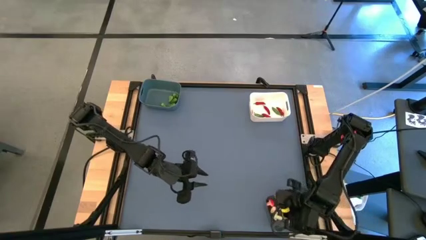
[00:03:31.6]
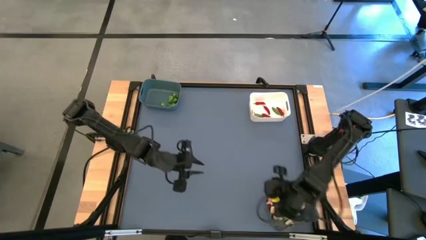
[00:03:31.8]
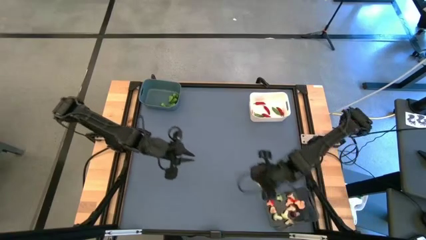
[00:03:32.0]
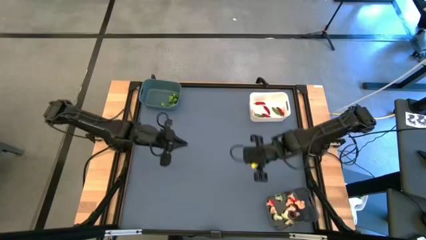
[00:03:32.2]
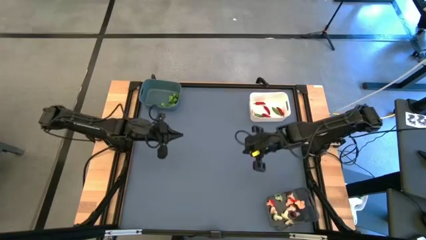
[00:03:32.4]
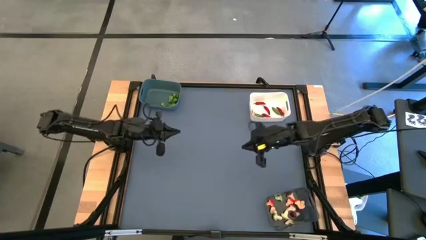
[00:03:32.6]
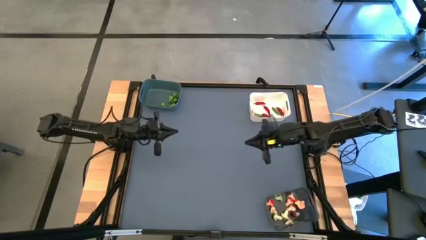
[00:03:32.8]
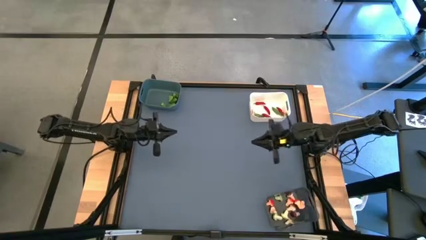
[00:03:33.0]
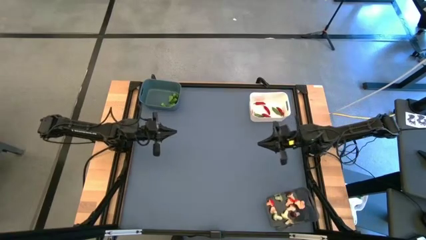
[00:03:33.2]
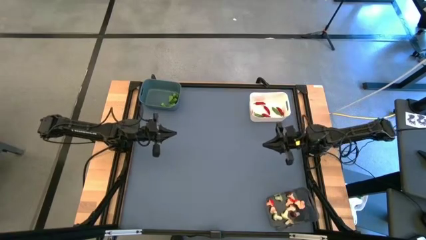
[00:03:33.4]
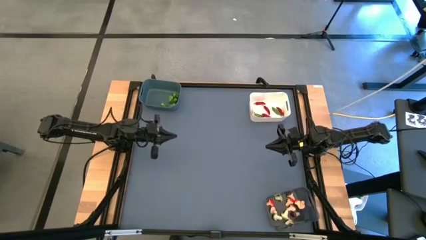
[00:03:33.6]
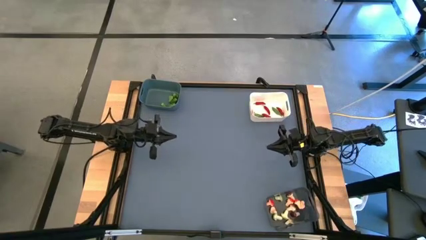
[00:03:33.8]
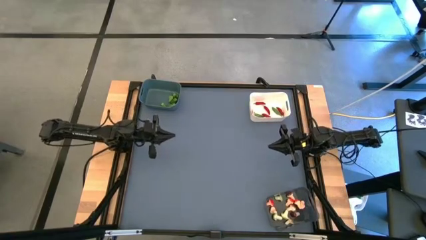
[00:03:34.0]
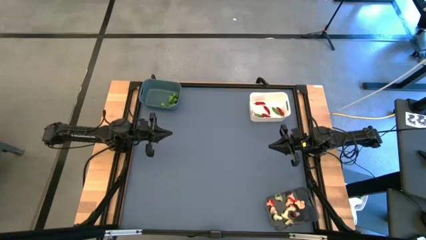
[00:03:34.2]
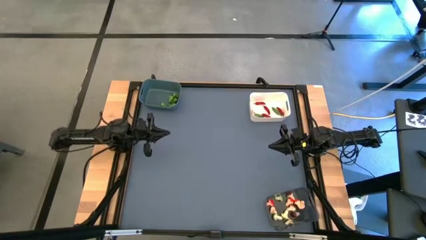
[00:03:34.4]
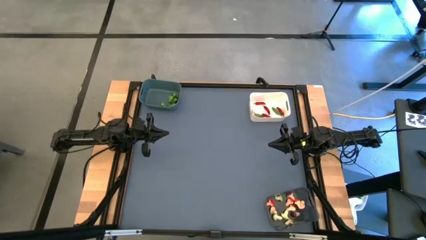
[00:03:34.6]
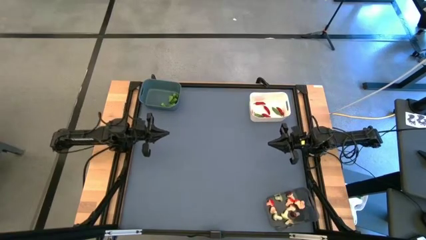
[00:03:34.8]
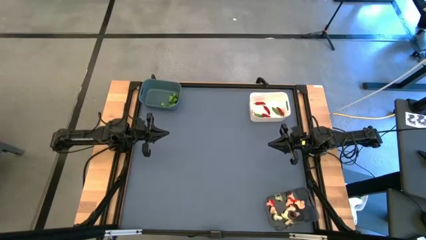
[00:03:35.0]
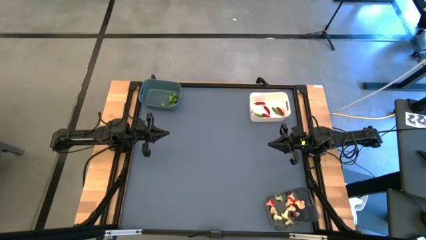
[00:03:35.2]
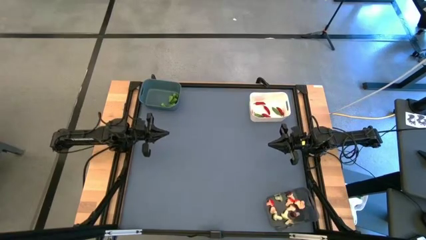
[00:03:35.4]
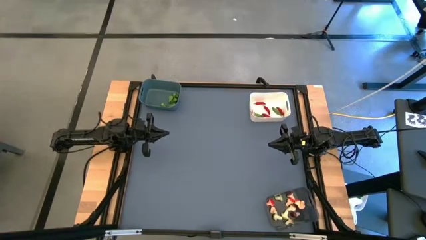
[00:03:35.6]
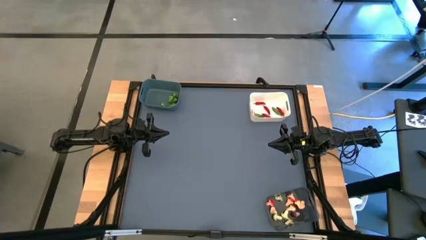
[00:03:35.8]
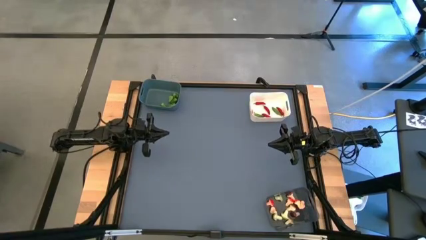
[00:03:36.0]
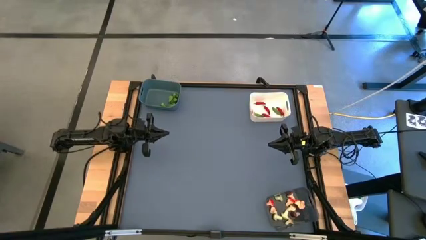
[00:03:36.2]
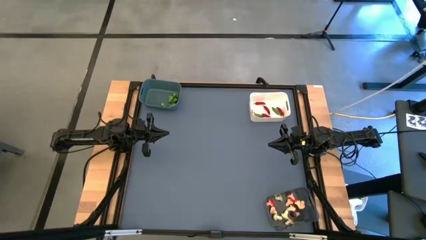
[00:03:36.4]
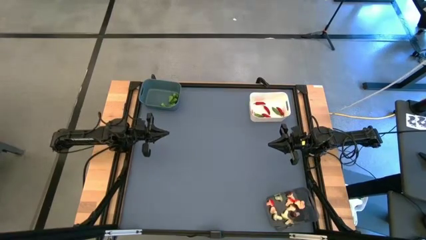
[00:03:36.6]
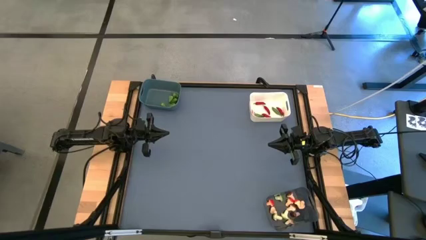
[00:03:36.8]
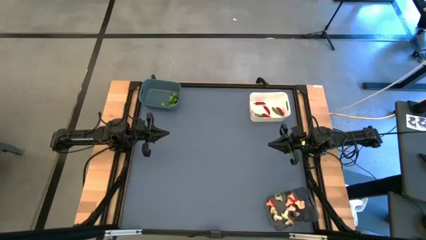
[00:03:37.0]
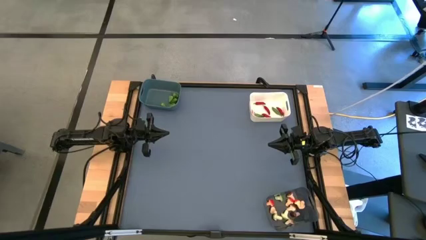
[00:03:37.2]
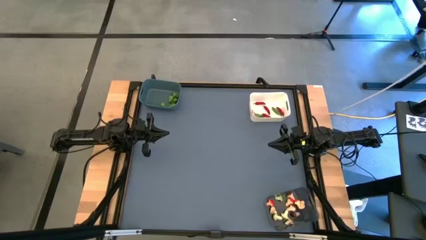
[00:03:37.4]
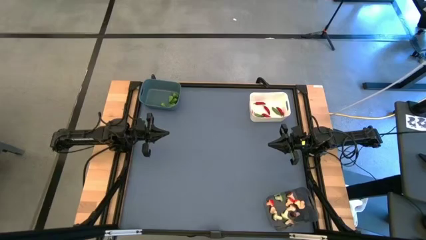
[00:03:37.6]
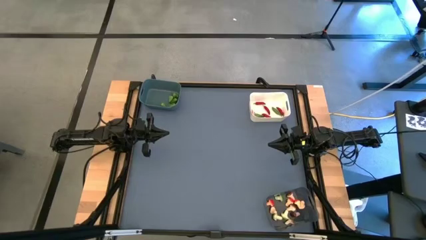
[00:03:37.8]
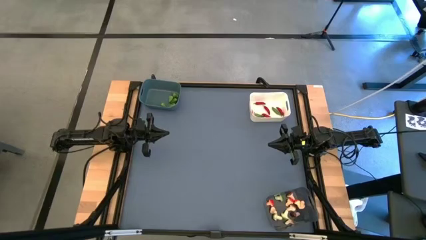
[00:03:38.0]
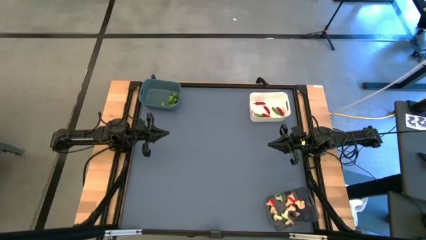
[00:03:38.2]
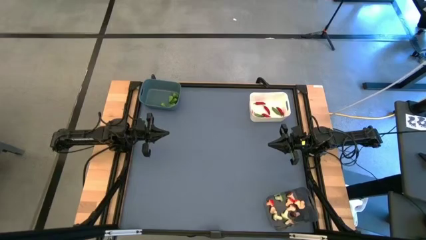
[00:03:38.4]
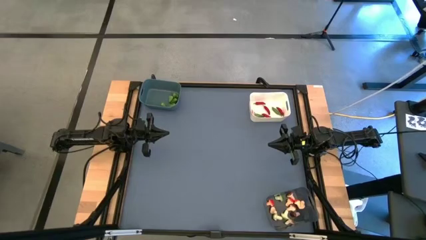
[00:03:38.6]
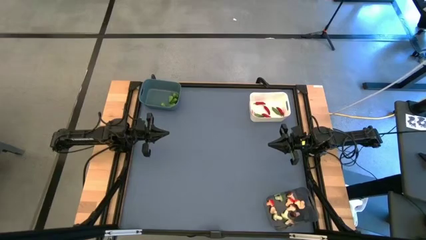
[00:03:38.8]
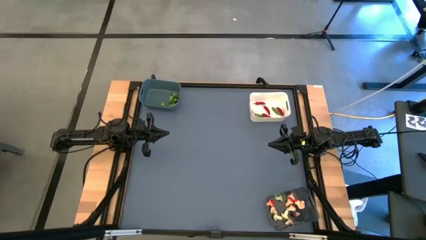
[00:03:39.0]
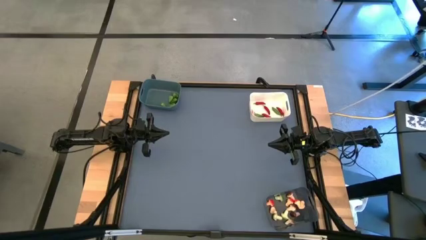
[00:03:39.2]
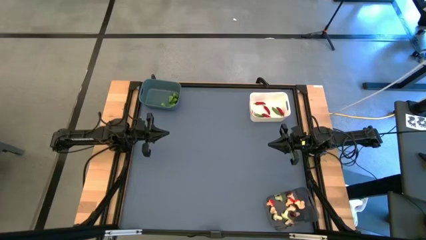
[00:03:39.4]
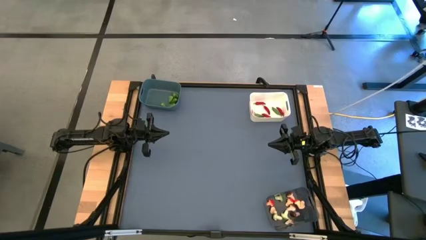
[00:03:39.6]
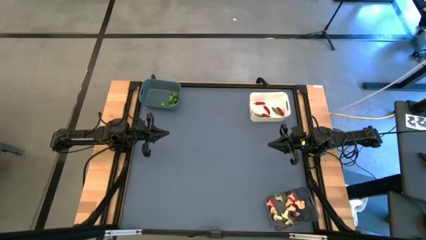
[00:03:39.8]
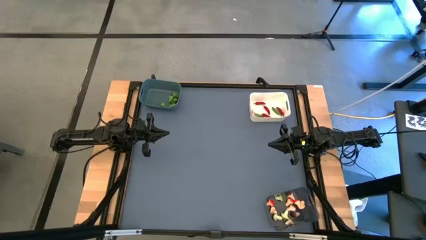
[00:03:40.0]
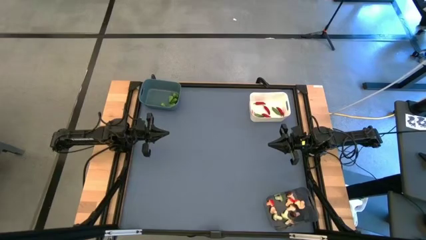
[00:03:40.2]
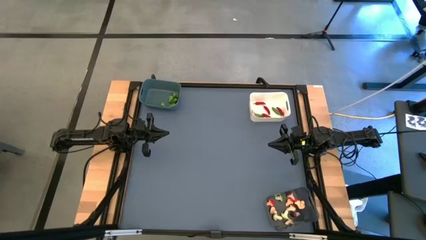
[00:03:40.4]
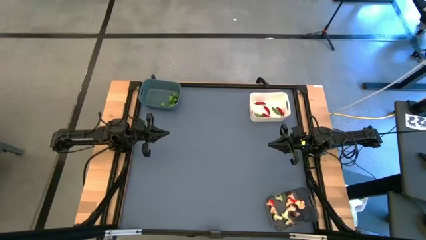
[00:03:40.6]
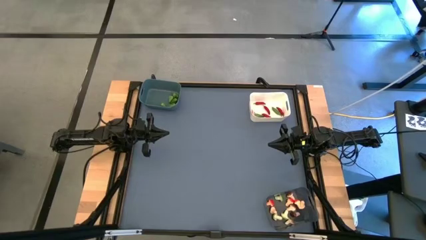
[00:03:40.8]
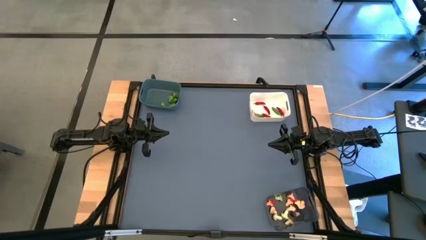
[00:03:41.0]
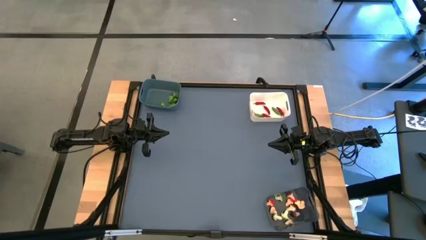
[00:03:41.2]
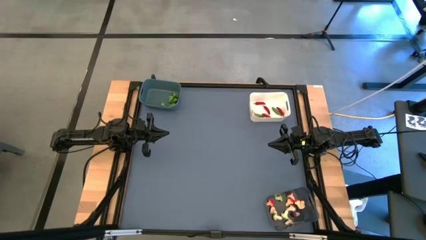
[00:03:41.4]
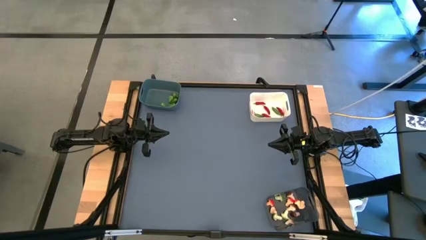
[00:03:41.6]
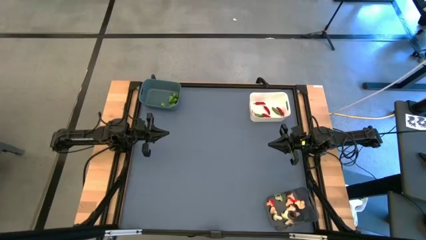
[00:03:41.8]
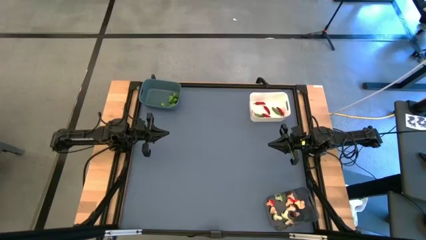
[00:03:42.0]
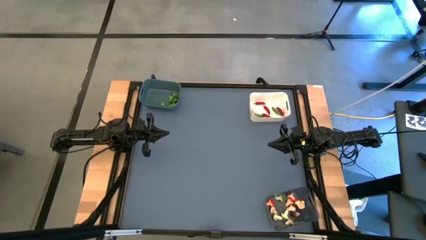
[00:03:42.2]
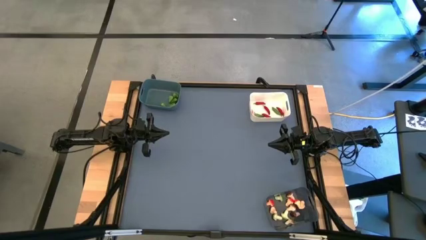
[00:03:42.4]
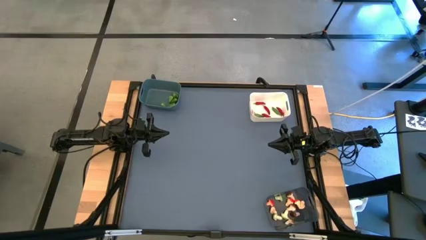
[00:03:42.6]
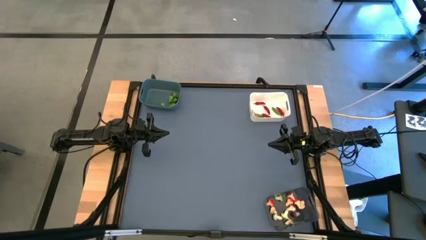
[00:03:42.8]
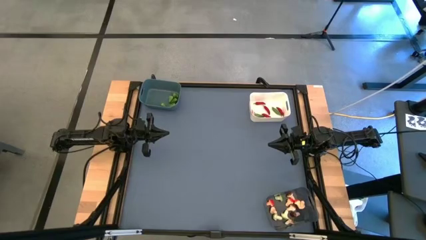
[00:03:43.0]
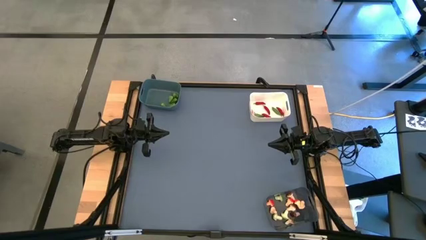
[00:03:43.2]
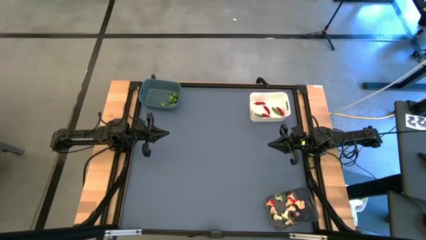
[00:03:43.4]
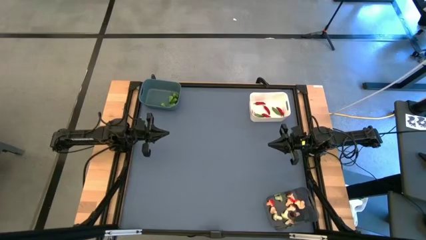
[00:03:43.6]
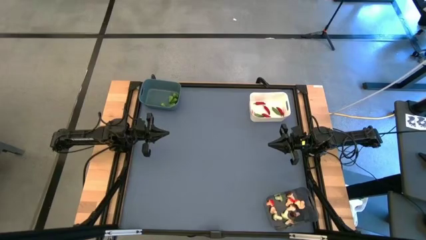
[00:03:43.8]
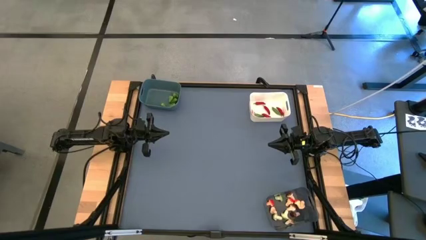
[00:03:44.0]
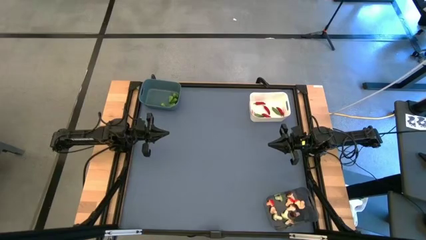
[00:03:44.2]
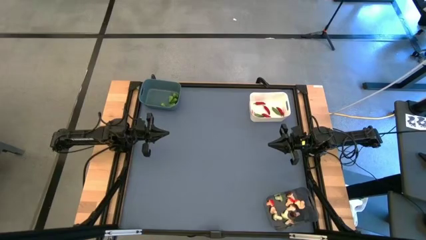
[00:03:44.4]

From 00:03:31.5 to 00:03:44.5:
Task: Sort produce into baskets
Return to home position

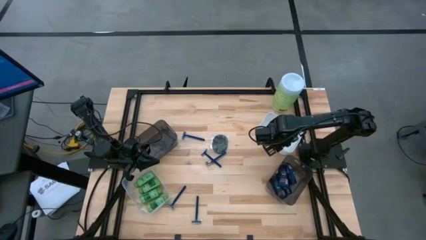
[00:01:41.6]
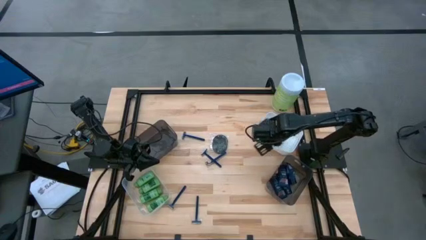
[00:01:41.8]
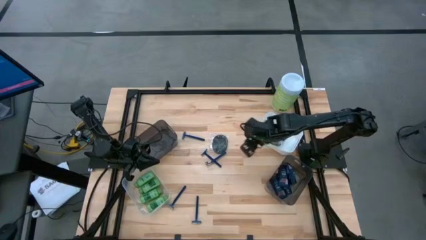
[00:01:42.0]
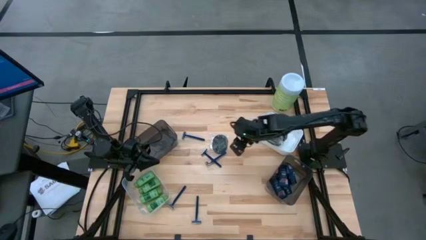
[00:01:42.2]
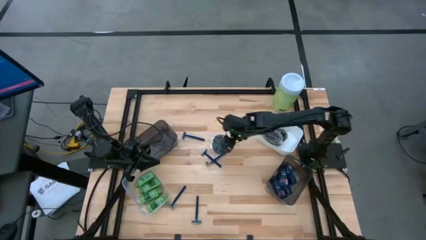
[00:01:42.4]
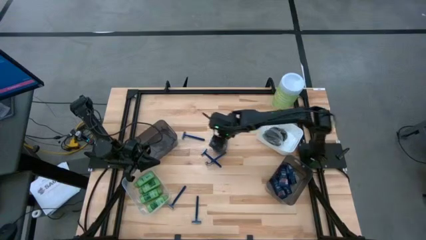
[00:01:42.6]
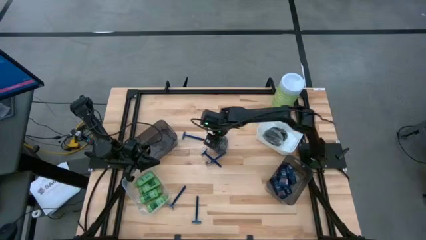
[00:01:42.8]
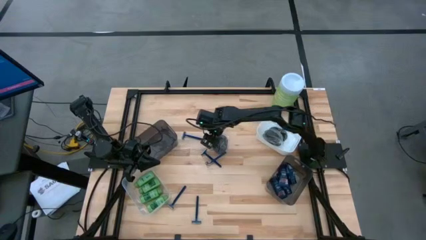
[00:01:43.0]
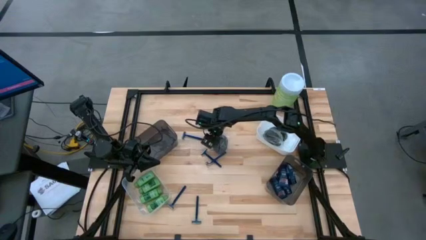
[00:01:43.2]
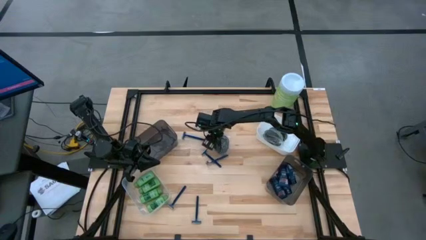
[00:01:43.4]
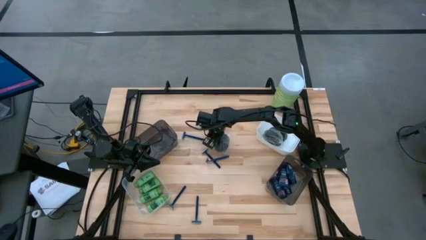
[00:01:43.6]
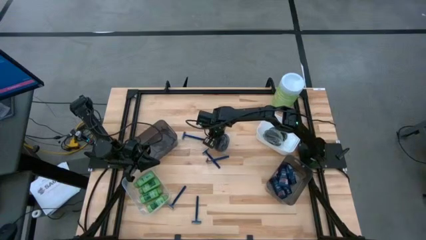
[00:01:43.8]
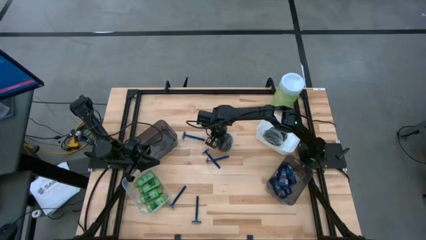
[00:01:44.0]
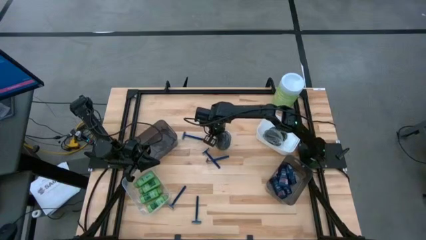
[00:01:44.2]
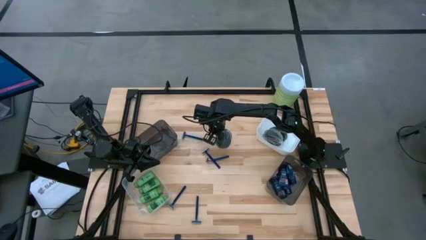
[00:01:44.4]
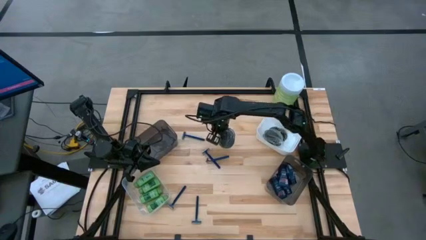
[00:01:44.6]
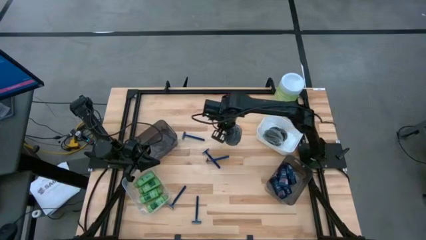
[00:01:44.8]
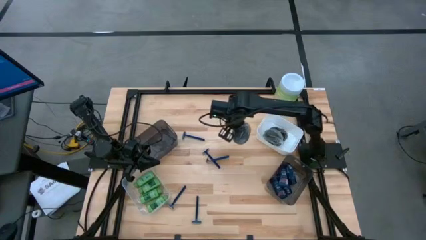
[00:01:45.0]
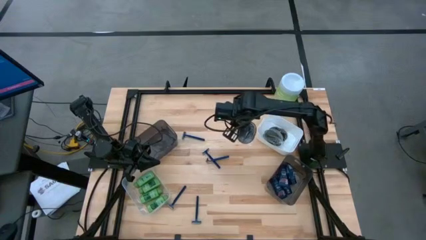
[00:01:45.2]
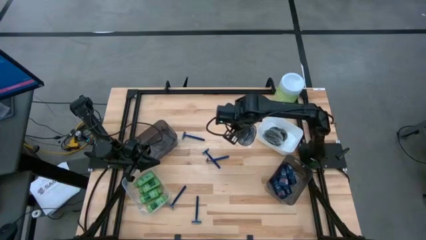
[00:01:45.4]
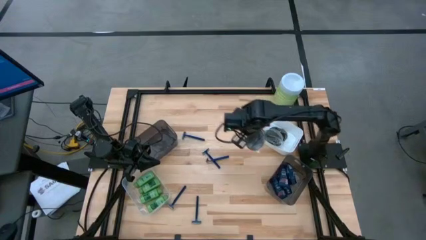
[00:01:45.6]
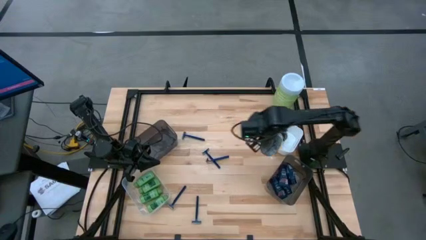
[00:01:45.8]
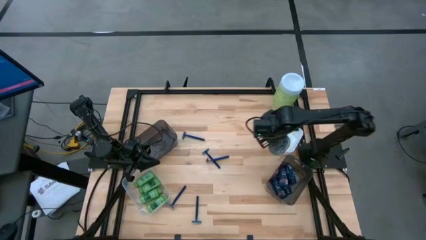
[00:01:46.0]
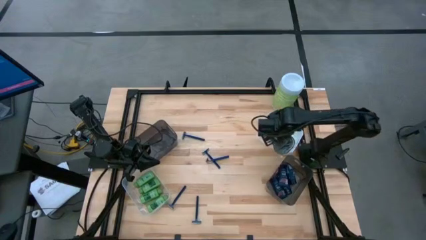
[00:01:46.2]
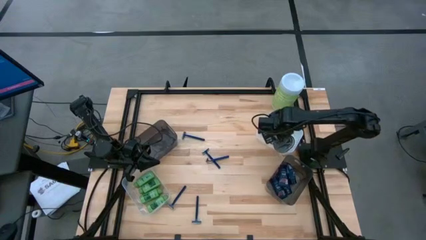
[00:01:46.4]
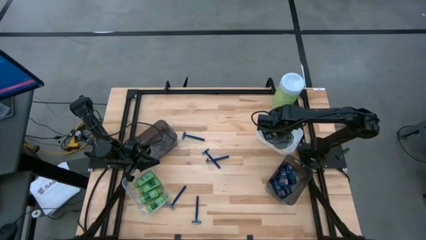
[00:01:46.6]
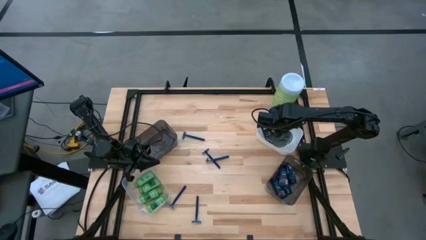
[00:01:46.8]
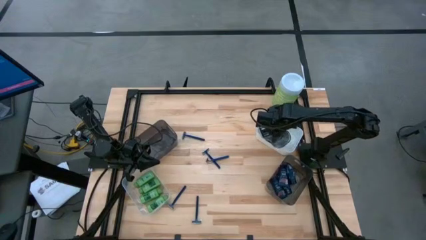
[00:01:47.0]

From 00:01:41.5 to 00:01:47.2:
Task: Pick & Place Travel size toiletries
Put the black hairbrush into the white bin
